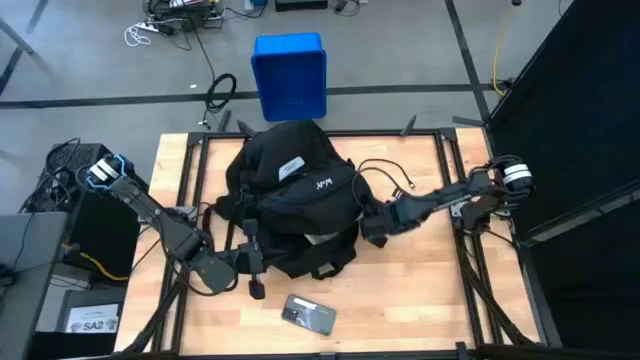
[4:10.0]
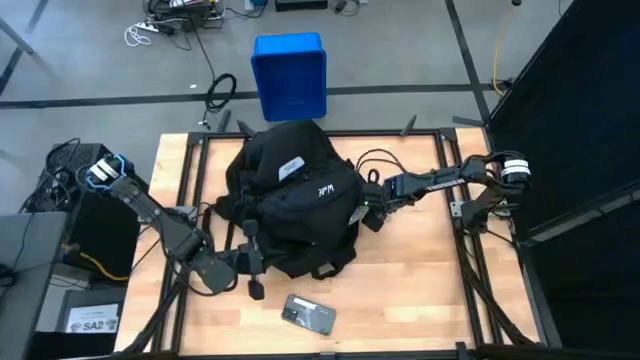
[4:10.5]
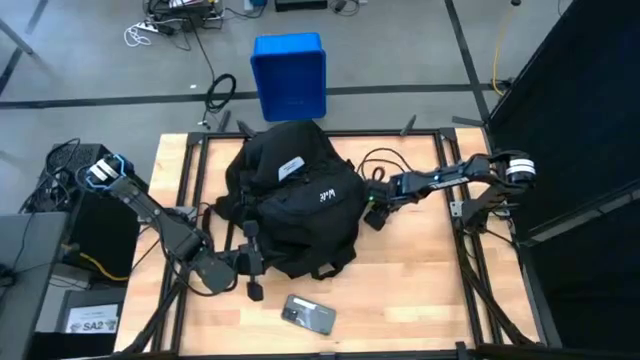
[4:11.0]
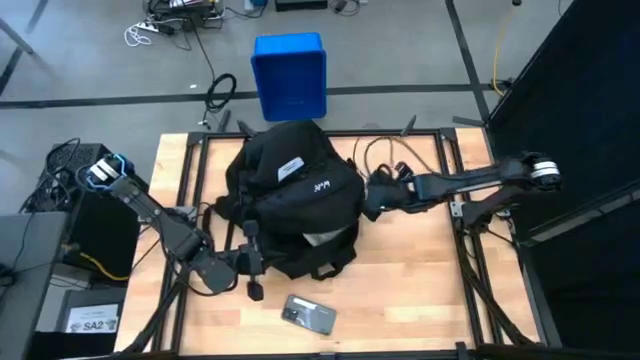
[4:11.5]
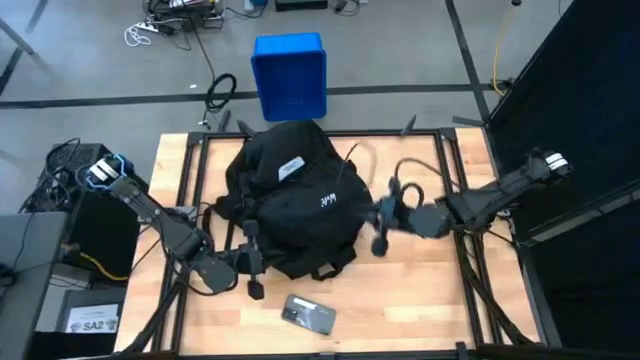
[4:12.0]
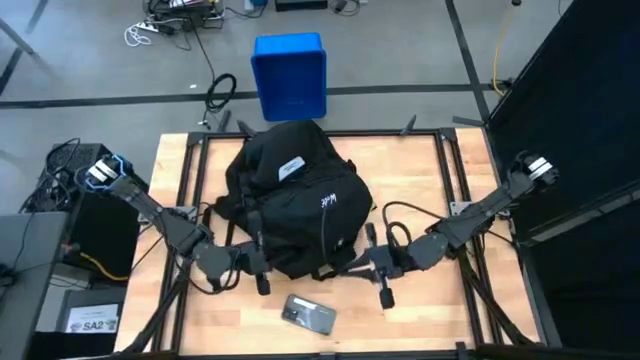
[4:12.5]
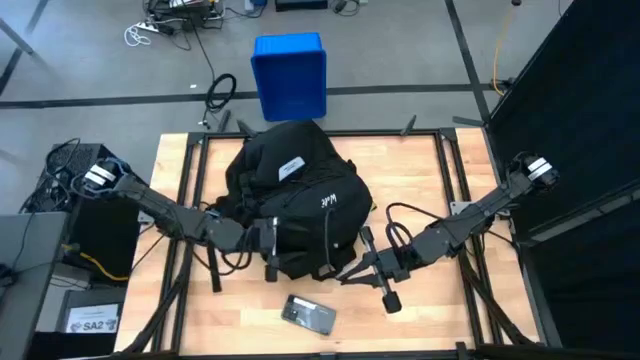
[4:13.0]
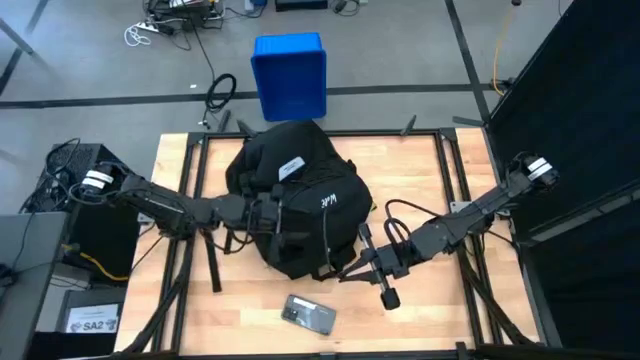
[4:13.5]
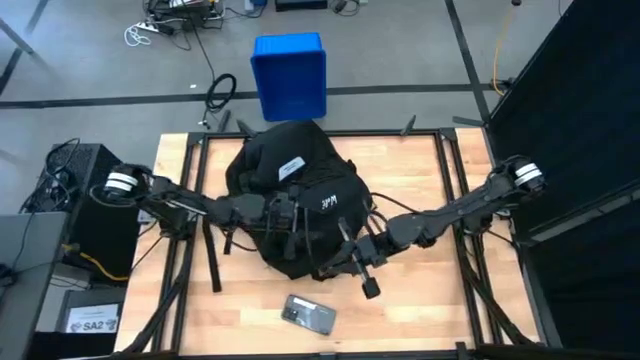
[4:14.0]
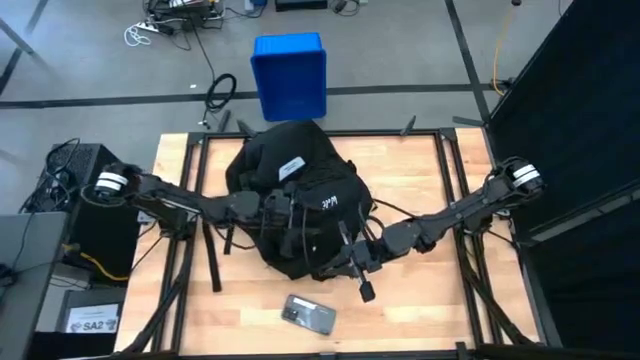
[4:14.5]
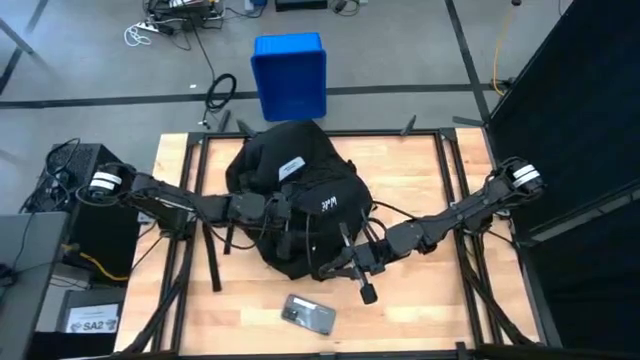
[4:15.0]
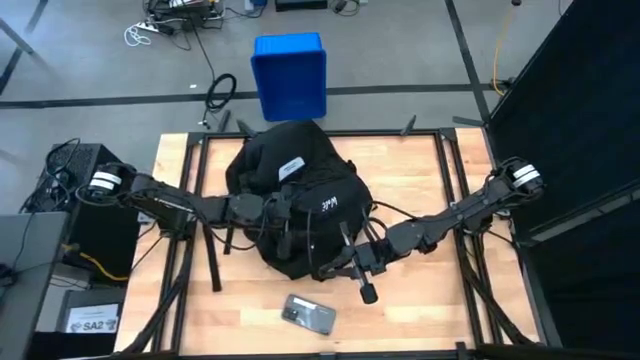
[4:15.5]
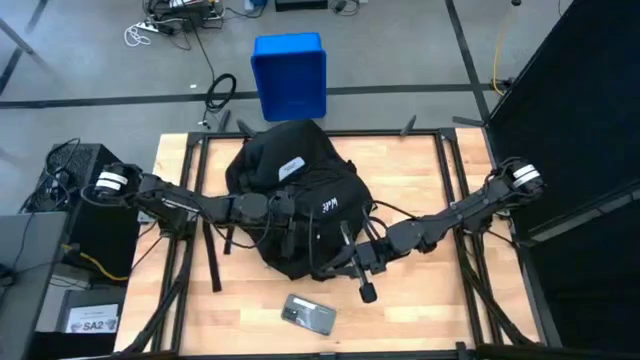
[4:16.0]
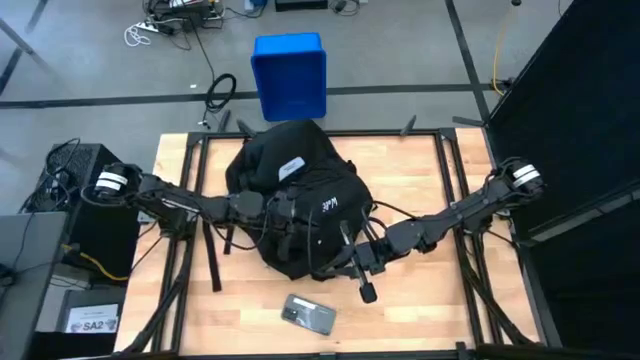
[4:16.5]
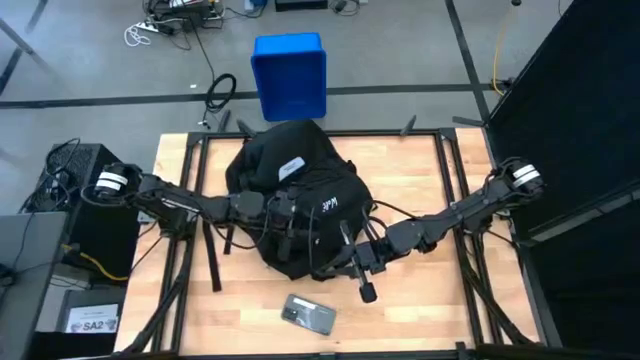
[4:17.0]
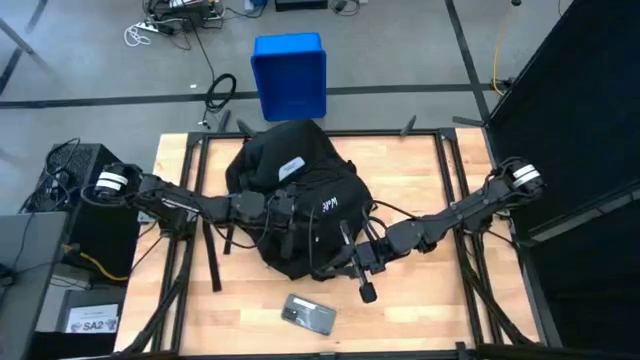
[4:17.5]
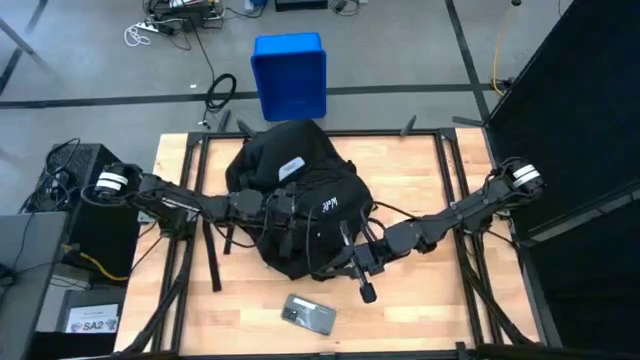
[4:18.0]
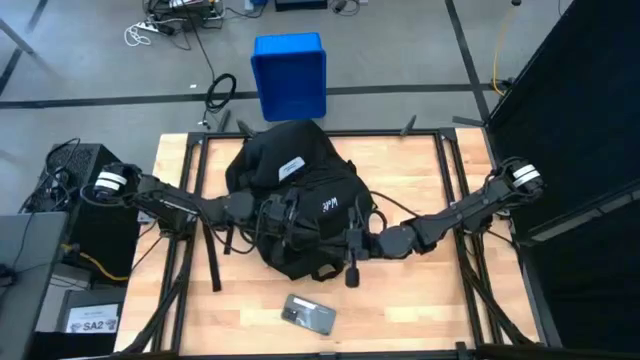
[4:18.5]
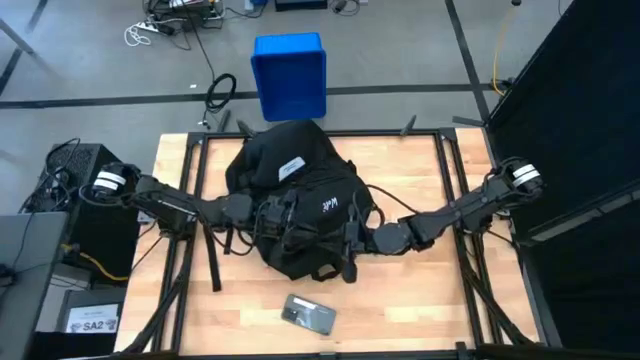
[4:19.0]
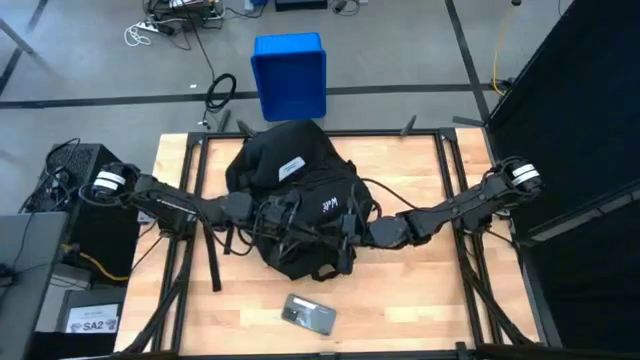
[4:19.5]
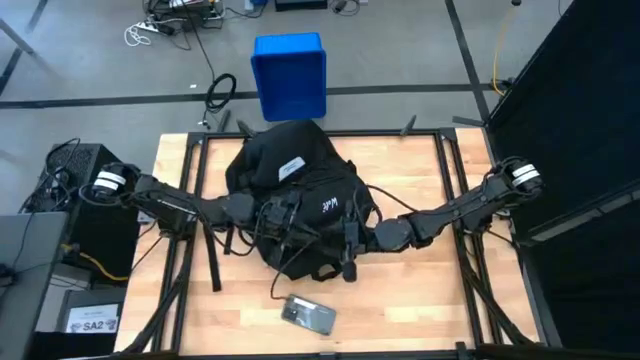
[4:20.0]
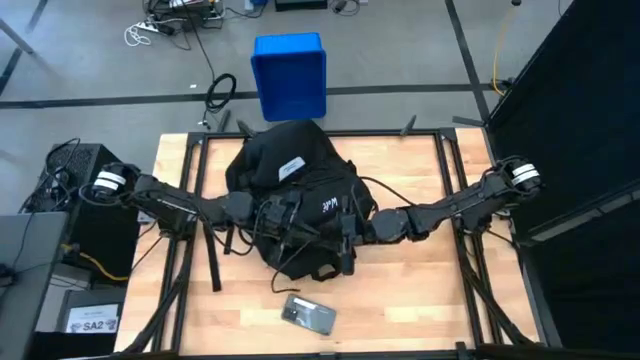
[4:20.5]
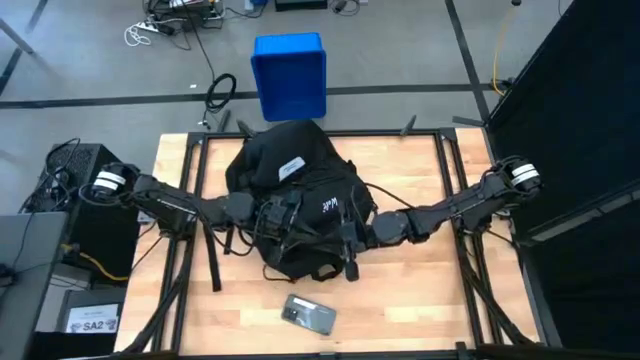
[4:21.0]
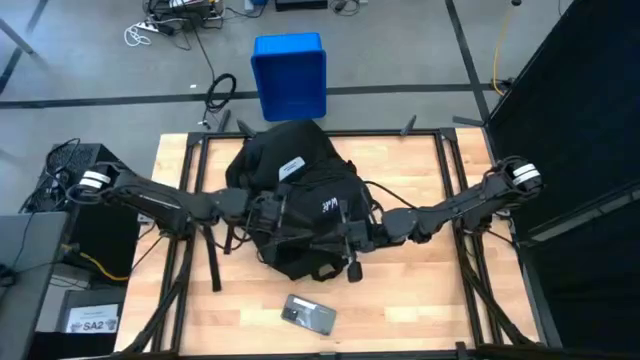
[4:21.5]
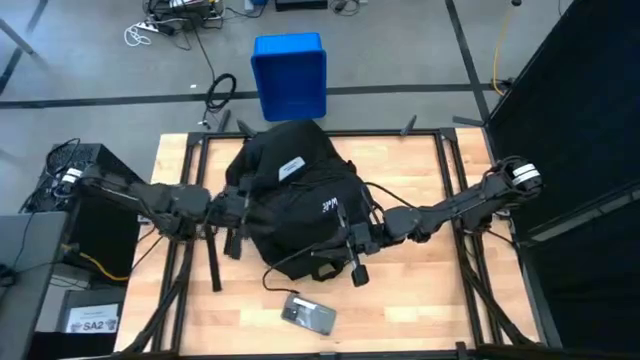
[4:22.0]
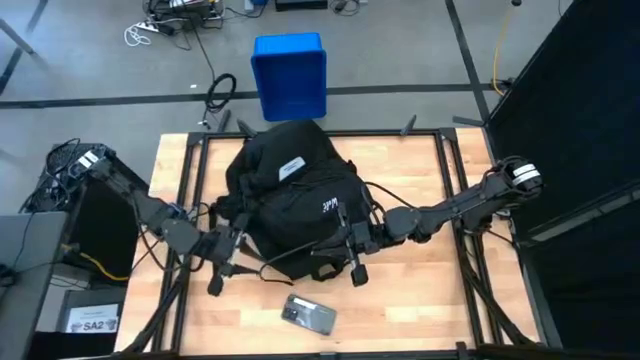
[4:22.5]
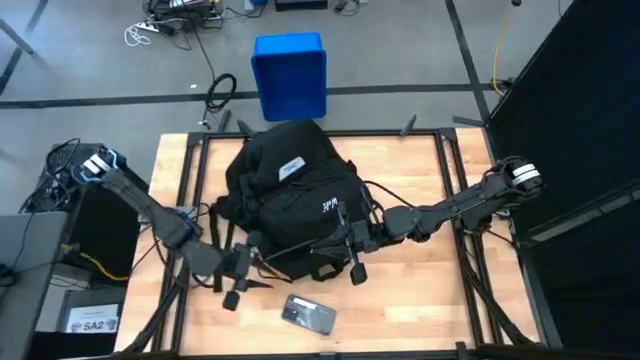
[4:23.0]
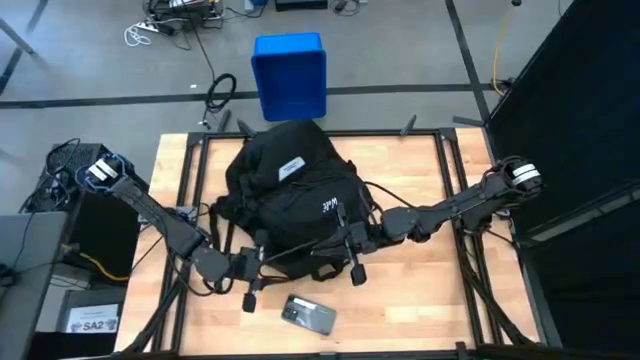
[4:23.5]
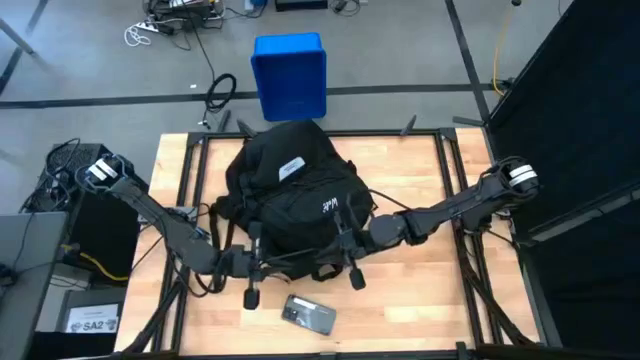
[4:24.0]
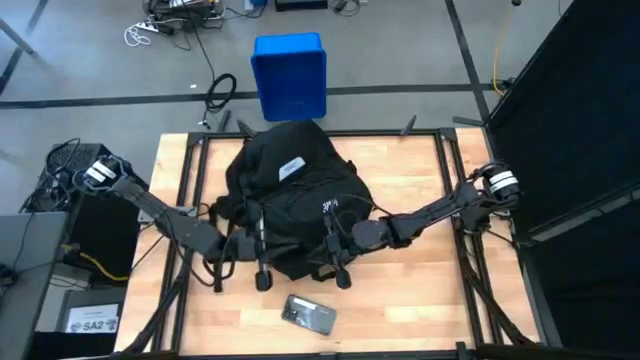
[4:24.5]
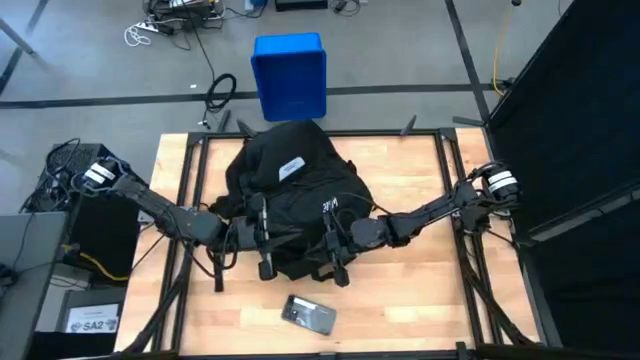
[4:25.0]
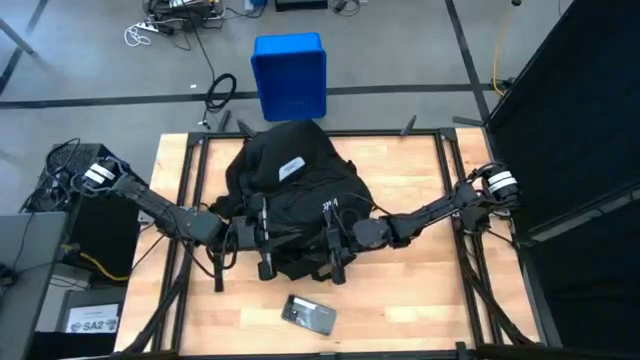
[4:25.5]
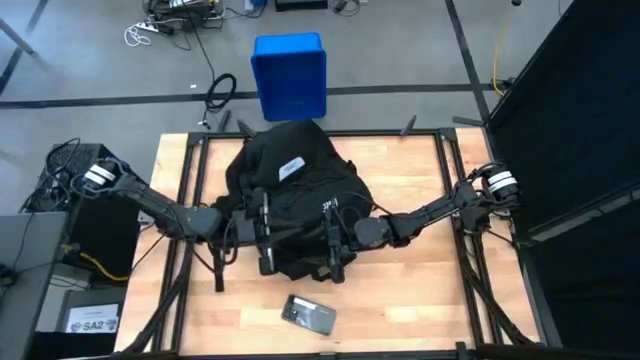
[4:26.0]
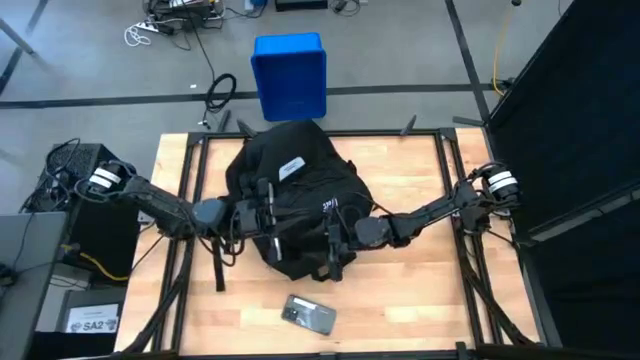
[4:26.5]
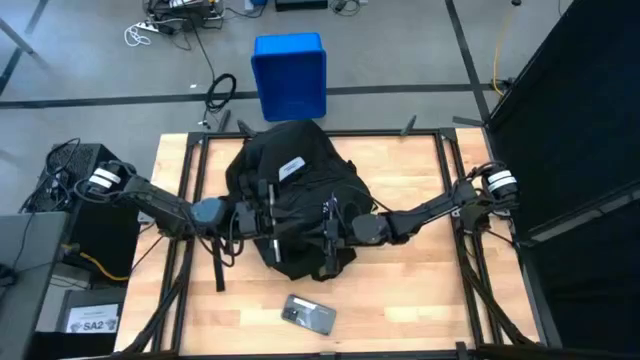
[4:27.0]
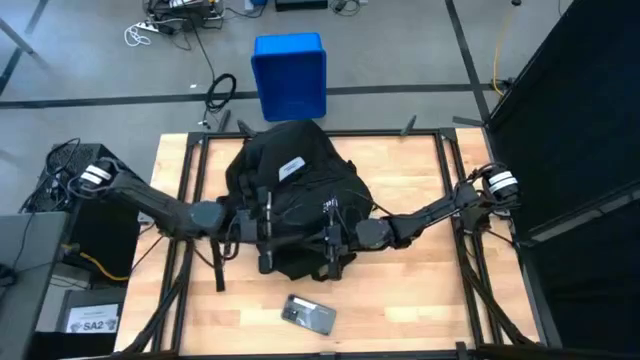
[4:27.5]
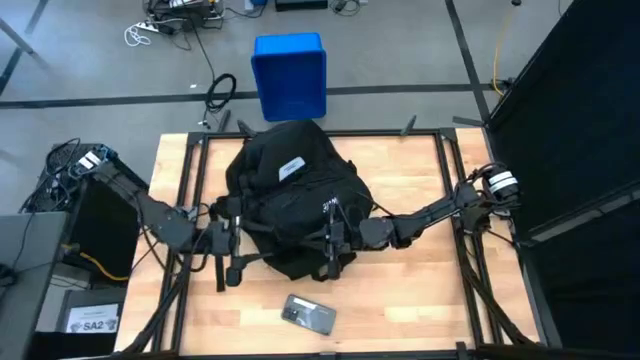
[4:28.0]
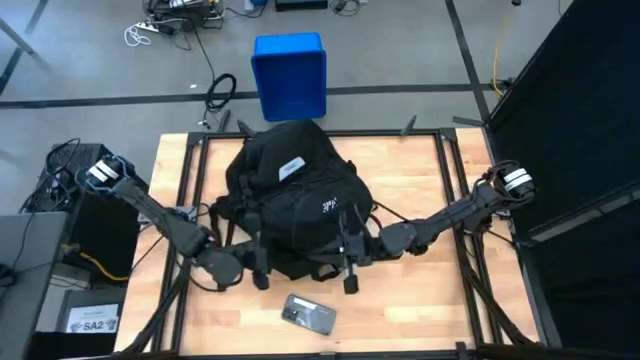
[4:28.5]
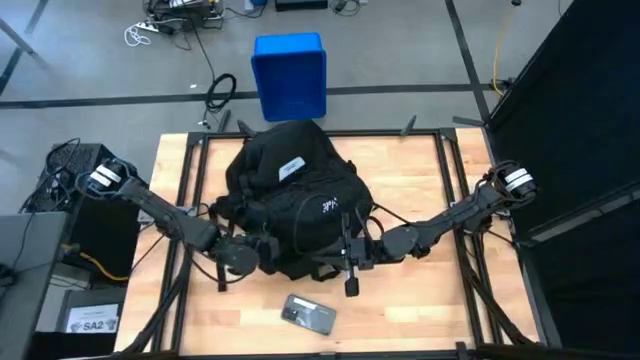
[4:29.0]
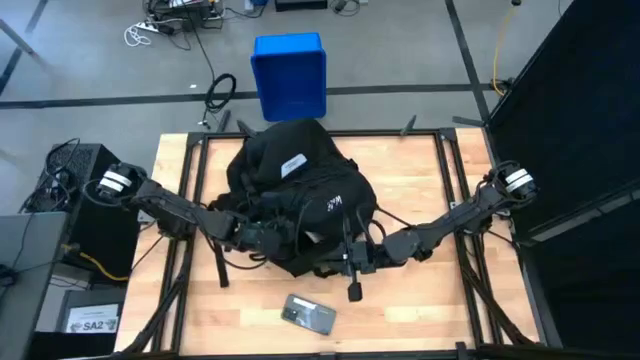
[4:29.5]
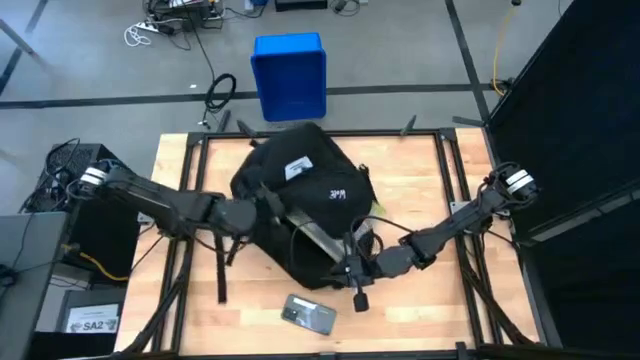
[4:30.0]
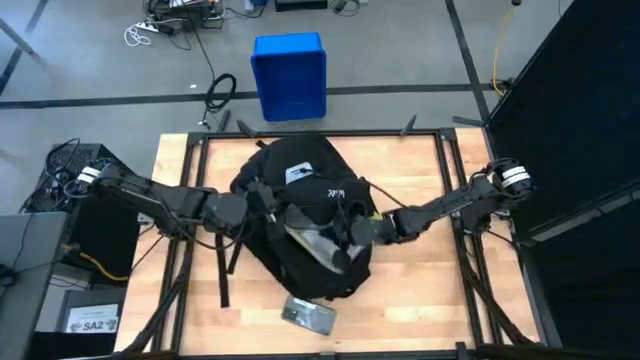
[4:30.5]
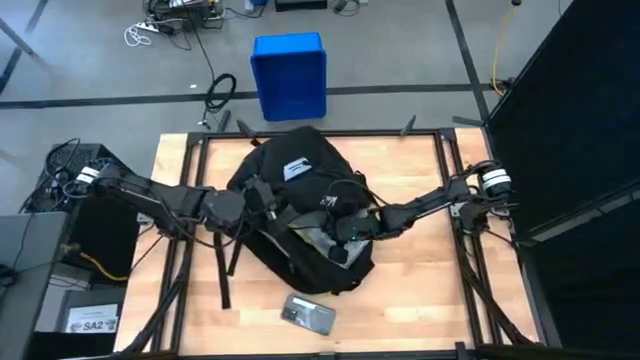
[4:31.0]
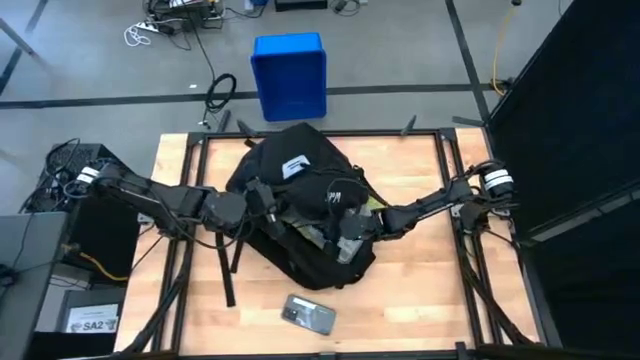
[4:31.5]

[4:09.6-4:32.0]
Task: Unpack backpack
Put the USB cable into the backpack
